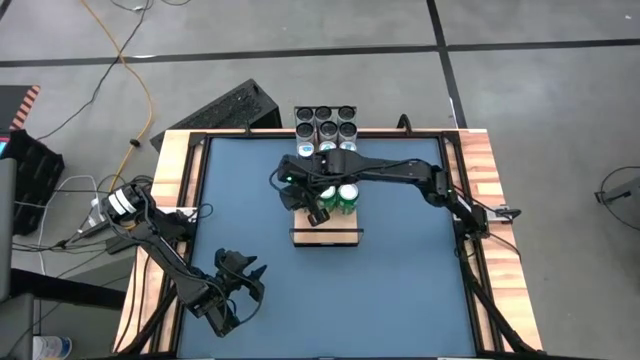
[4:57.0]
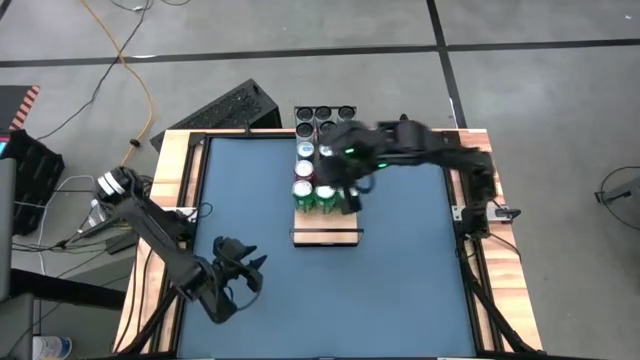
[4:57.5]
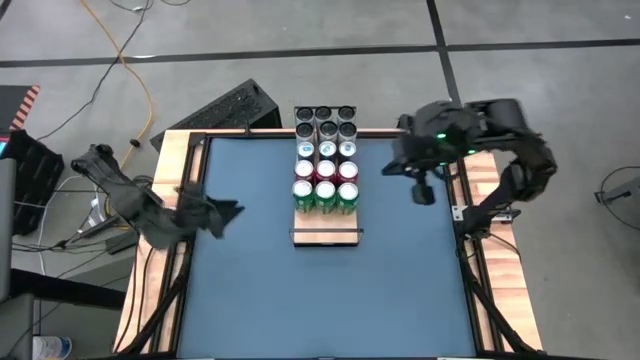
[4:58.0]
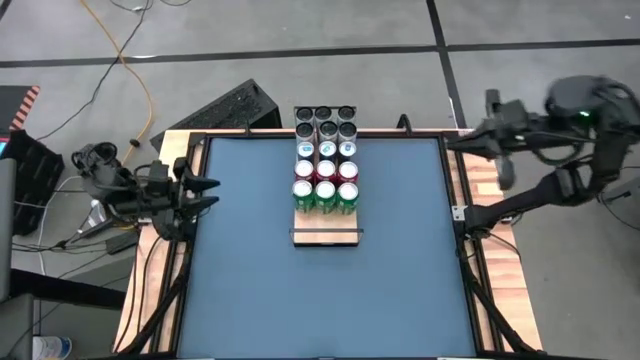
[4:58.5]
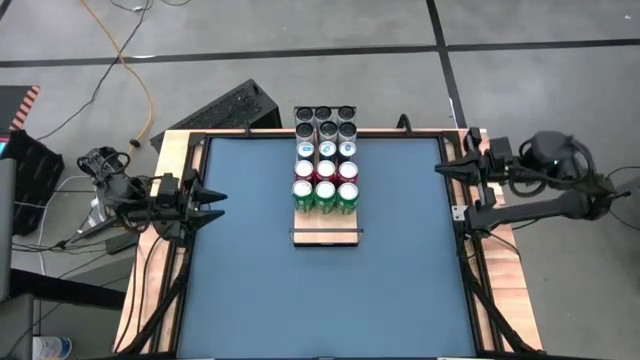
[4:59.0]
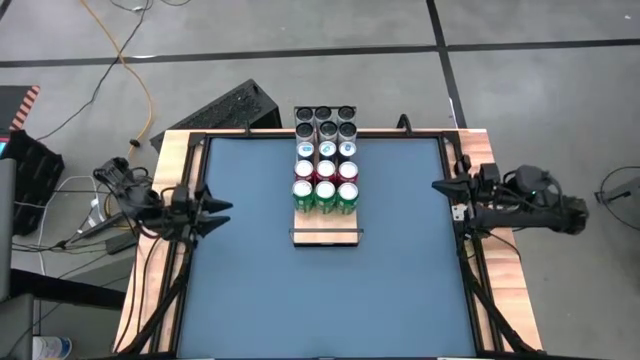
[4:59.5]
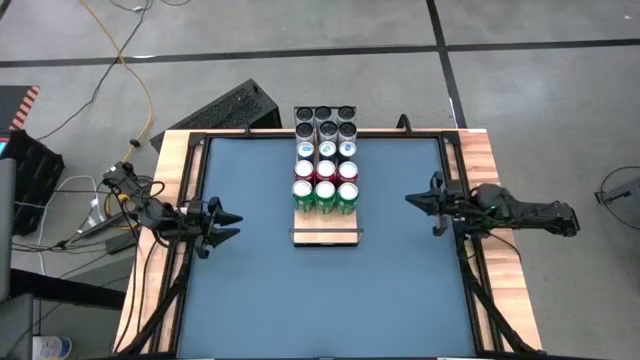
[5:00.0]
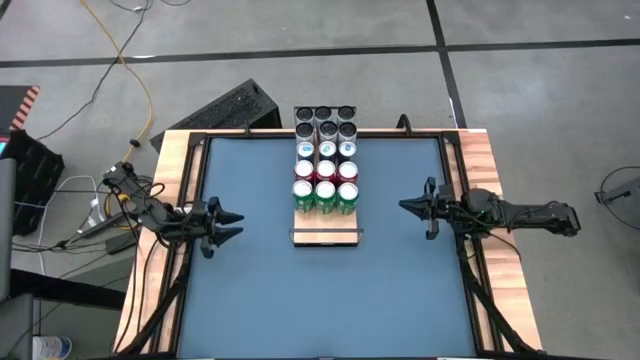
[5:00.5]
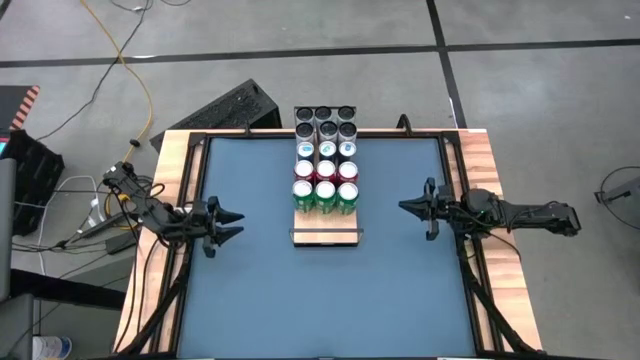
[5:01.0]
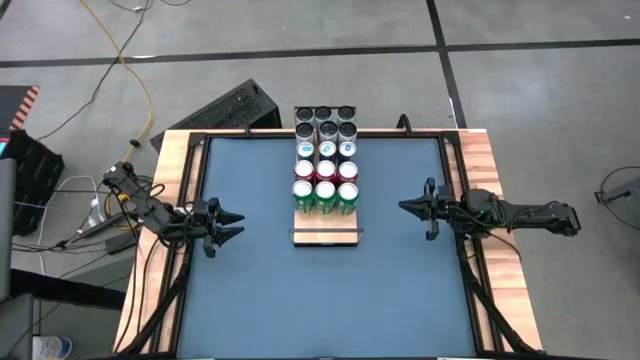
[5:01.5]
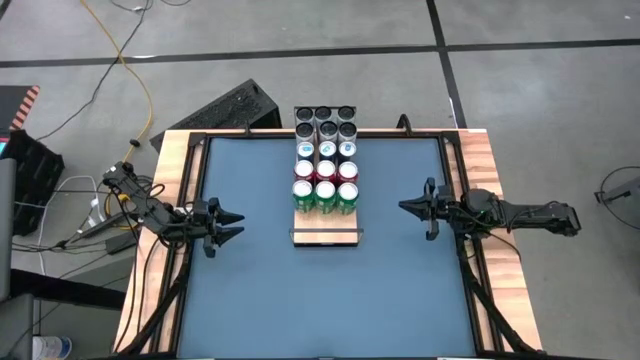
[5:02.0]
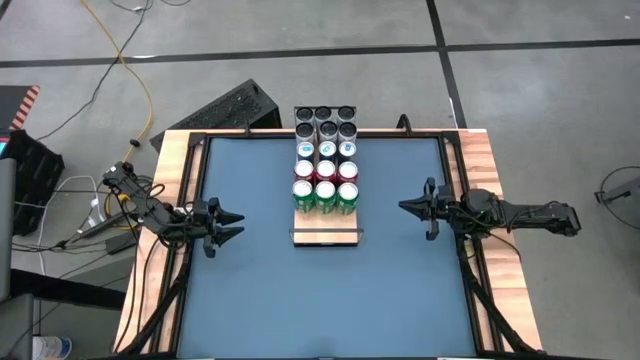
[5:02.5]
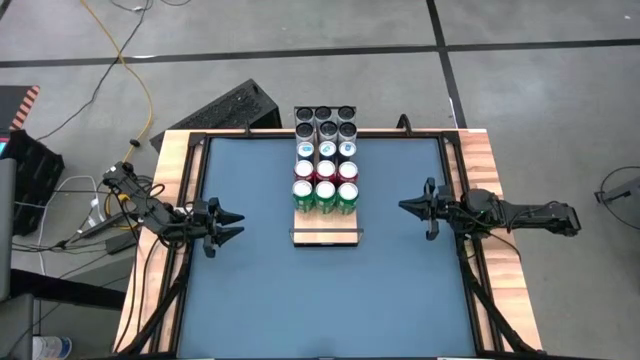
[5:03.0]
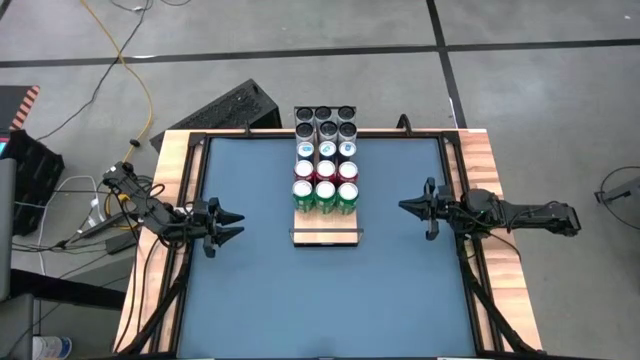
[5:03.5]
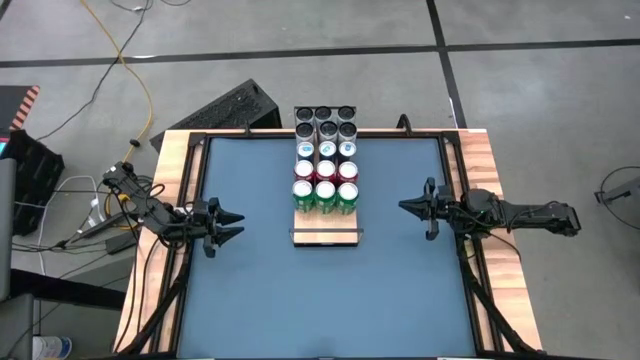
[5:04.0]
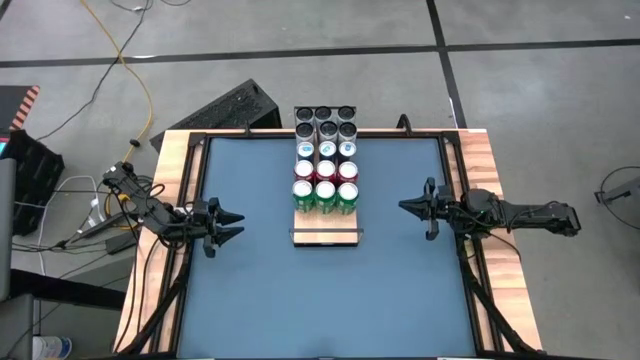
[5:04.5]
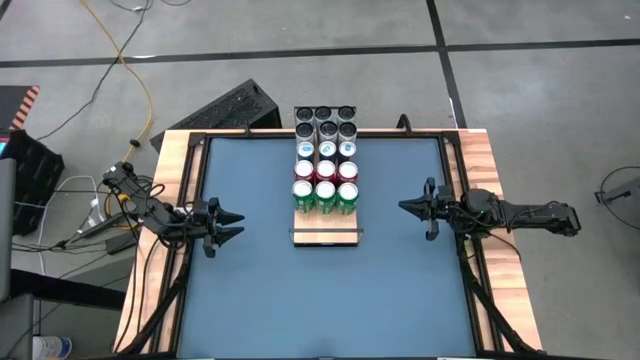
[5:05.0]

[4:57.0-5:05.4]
Task: Place canned beverage on shelf
Return to Home Position

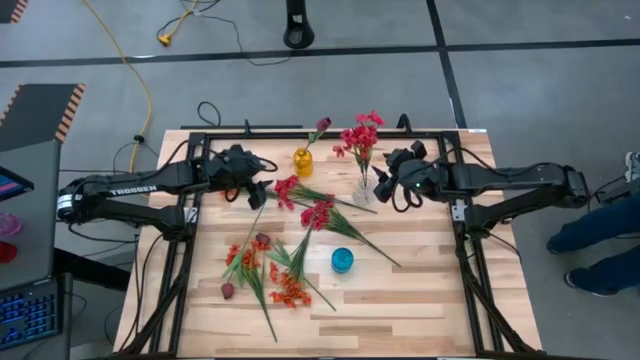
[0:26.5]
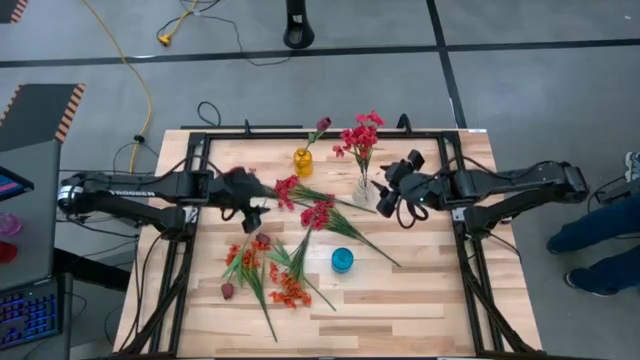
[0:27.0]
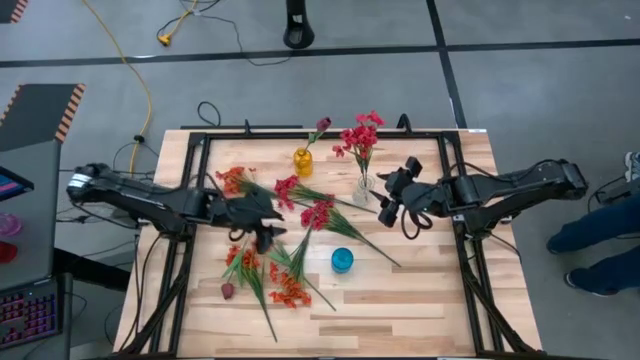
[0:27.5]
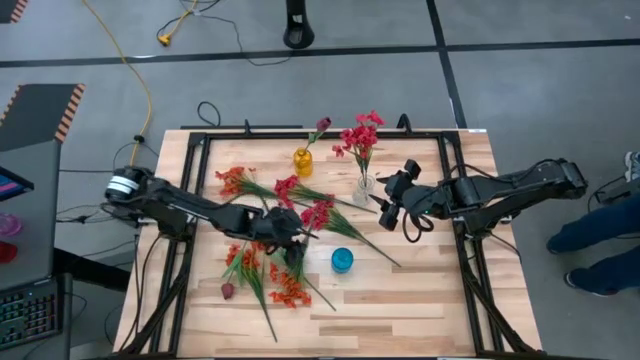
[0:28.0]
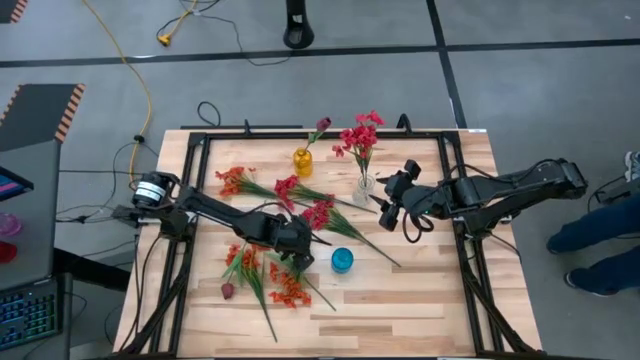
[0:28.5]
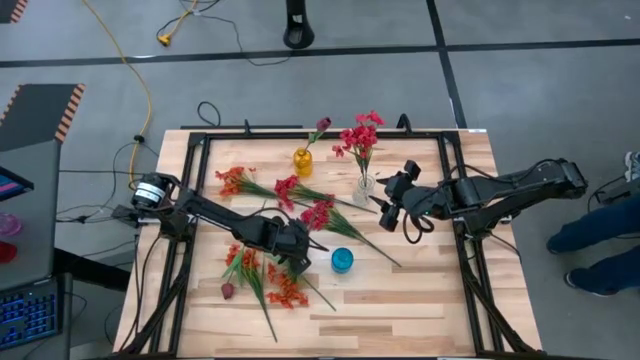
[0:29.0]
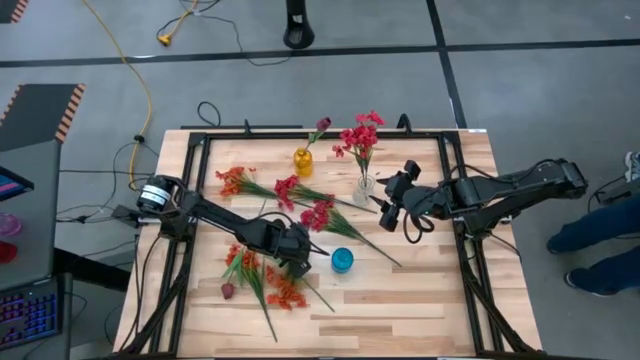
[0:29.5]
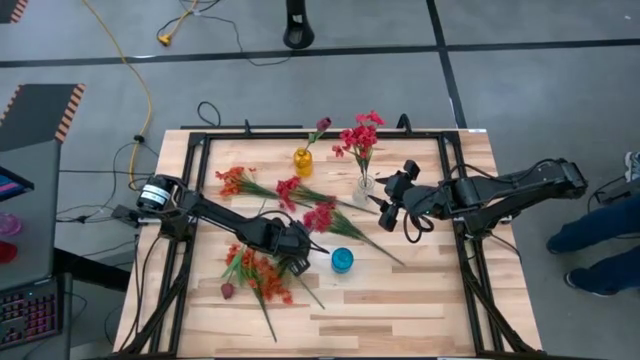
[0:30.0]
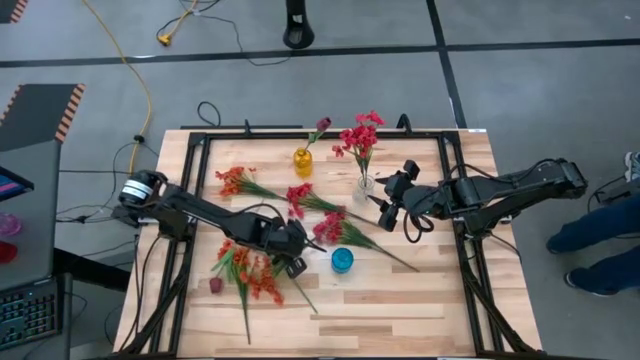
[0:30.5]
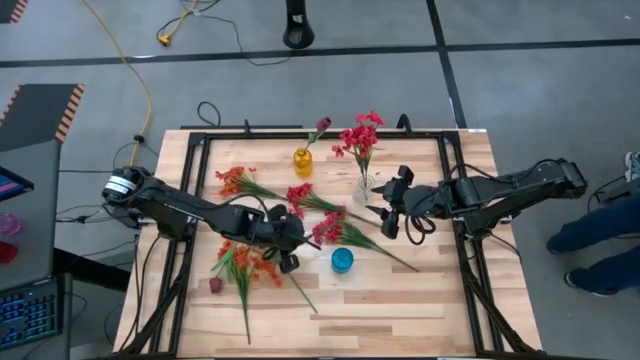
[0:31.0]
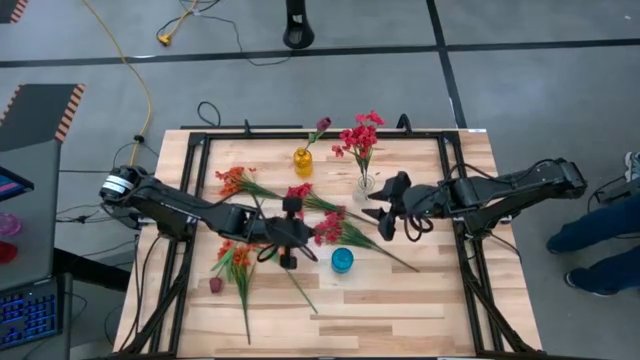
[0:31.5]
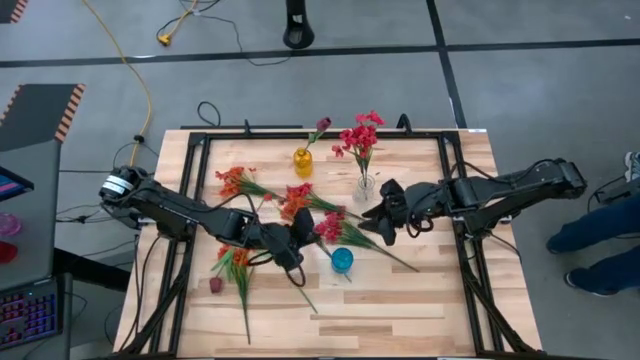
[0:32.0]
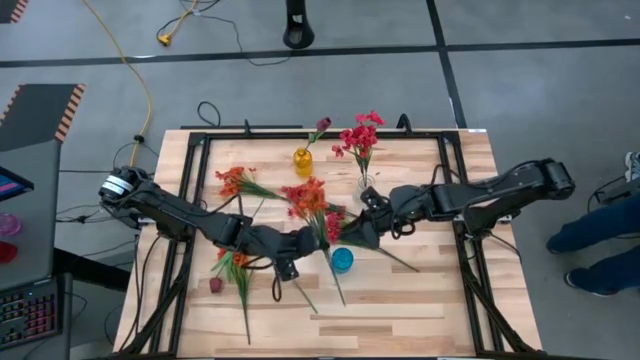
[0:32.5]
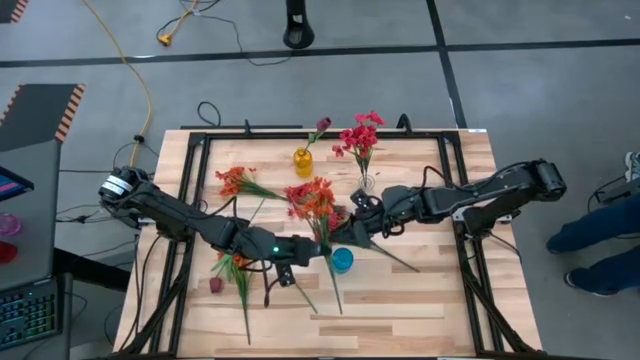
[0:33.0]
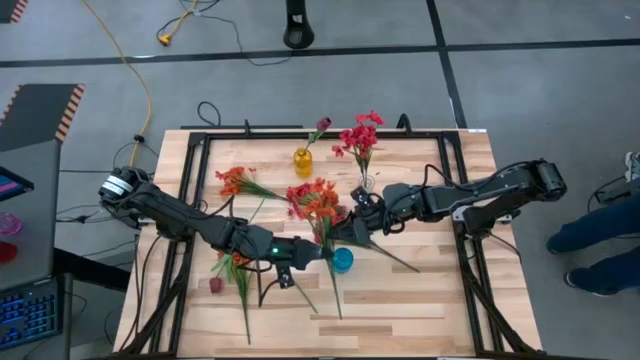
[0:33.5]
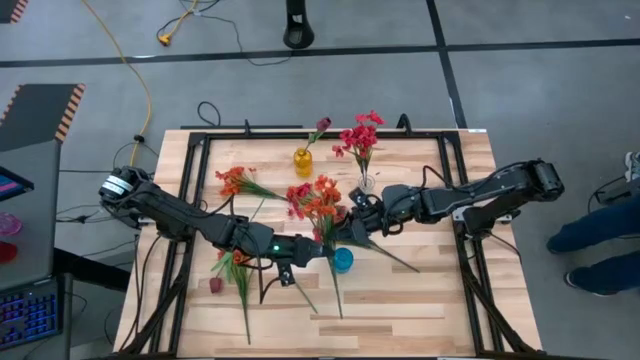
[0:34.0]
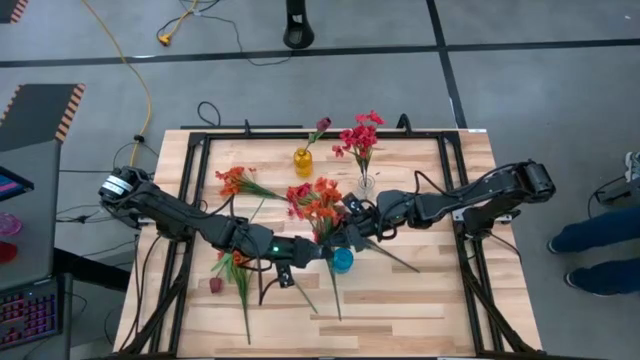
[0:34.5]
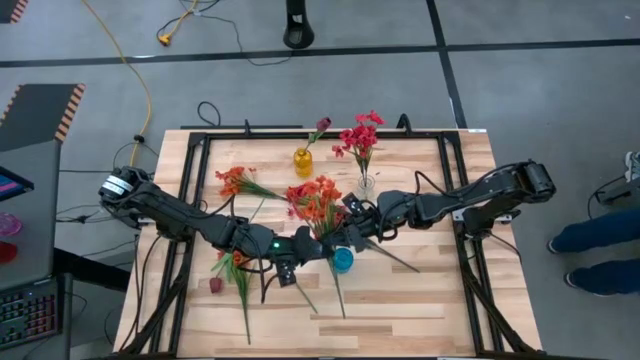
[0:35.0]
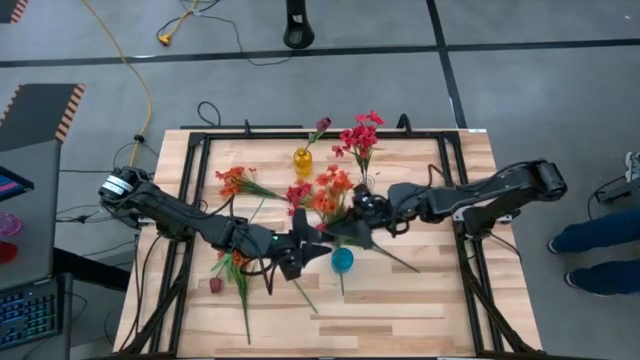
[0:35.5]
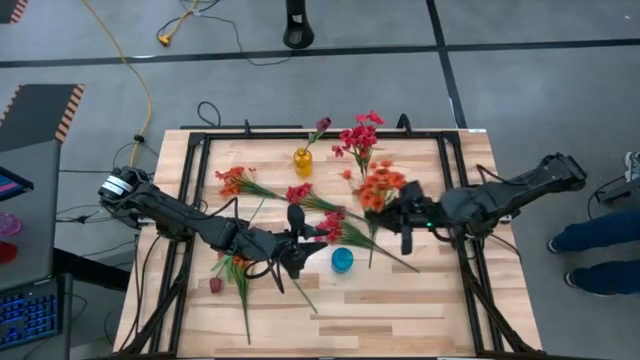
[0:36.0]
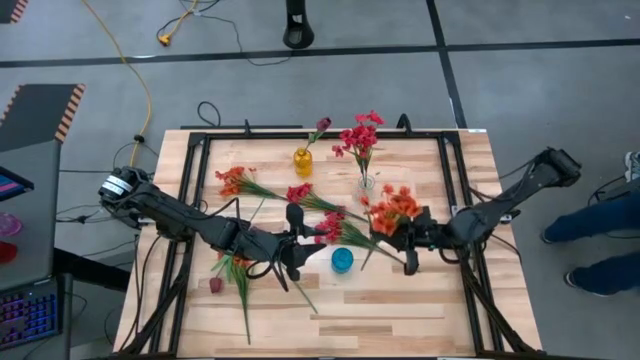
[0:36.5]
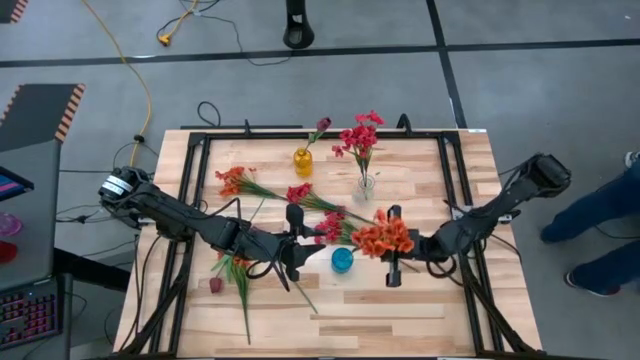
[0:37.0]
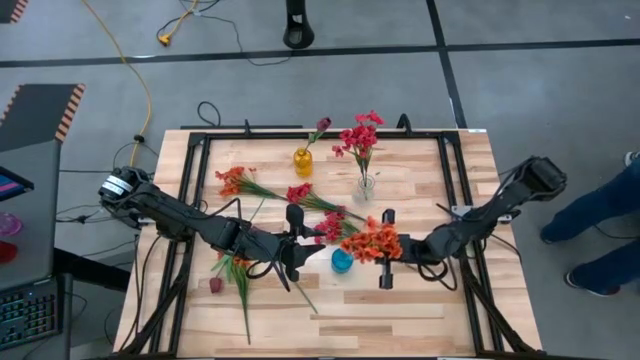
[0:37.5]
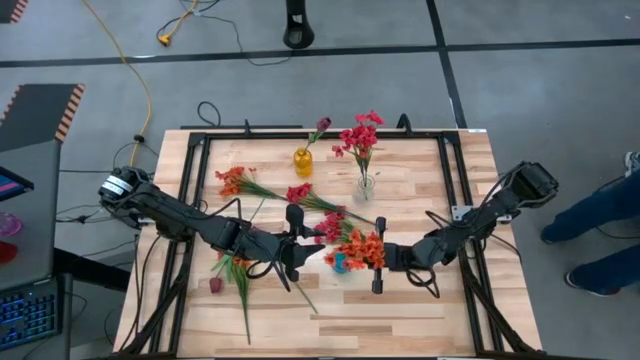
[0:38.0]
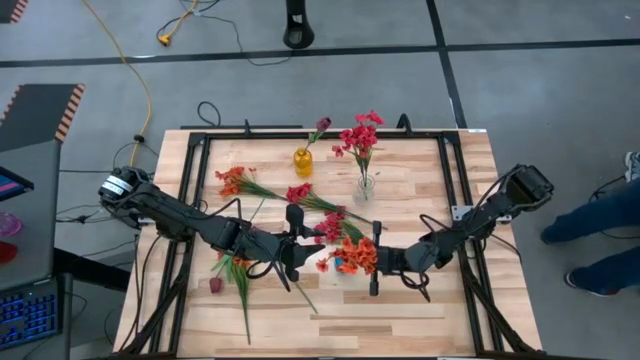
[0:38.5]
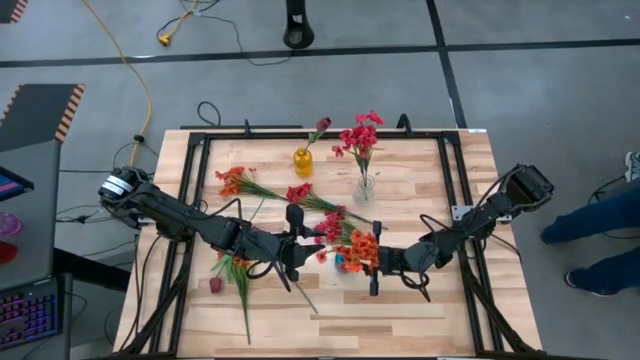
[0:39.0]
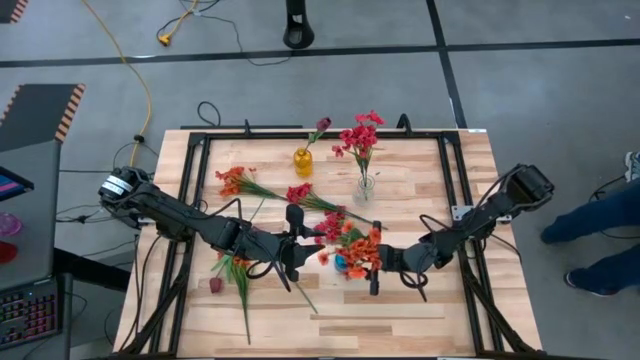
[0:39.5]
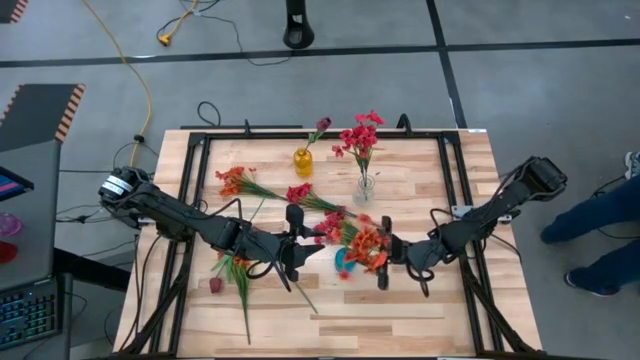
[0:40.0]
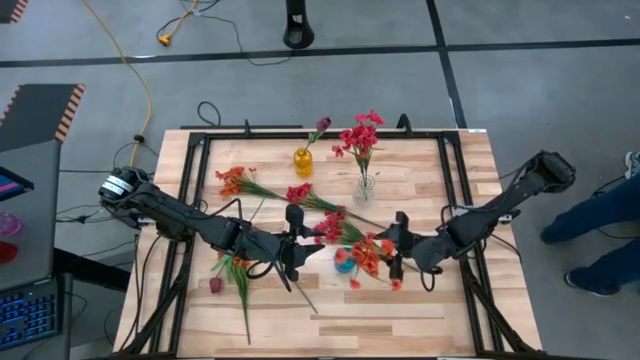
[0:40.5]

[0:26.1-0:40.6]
Task: Sort flowers into vase by color
Put the bottom right orange flowers into the blue vase
